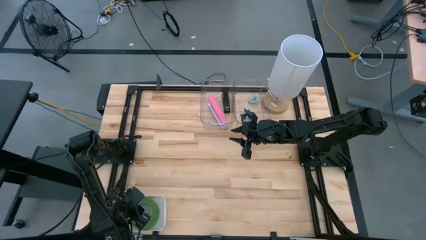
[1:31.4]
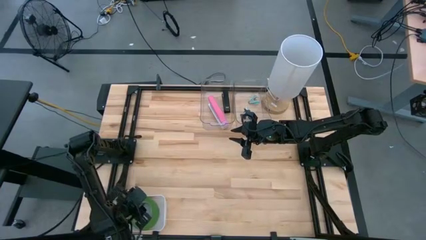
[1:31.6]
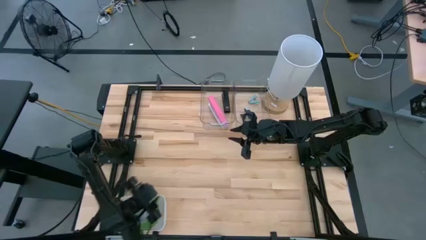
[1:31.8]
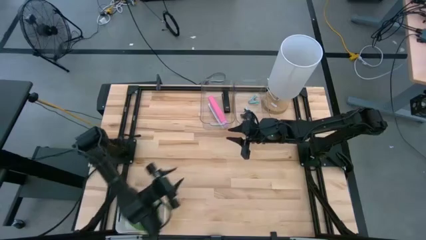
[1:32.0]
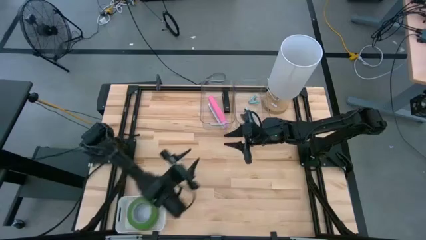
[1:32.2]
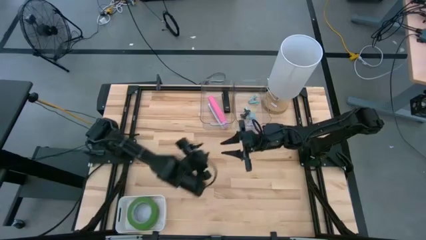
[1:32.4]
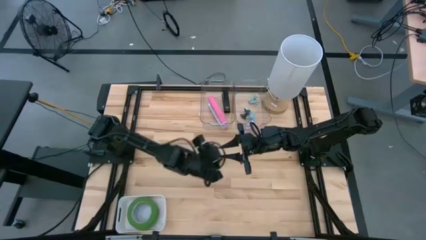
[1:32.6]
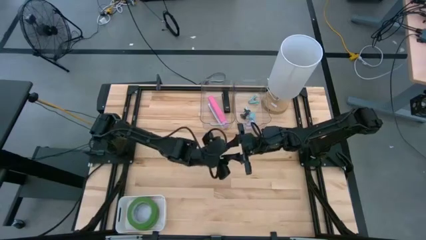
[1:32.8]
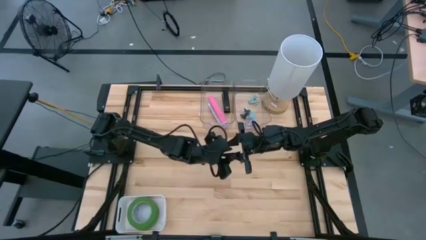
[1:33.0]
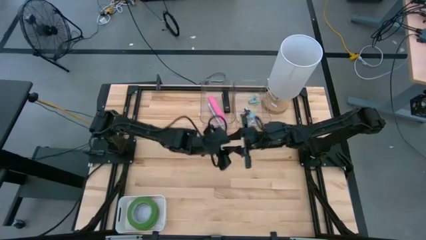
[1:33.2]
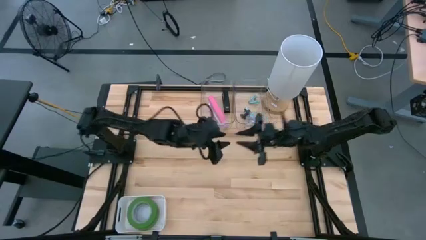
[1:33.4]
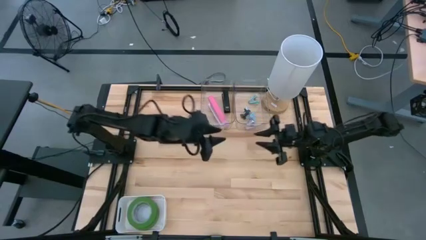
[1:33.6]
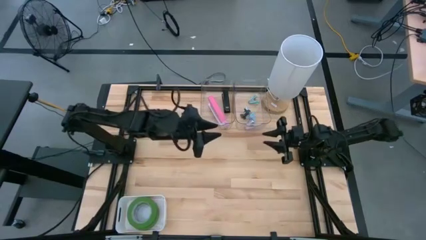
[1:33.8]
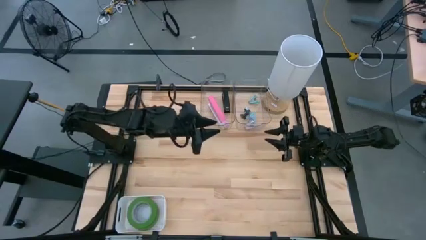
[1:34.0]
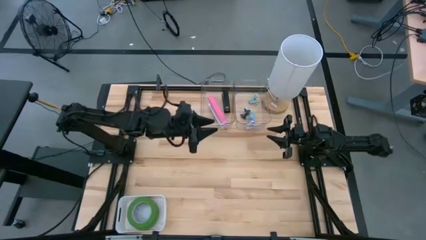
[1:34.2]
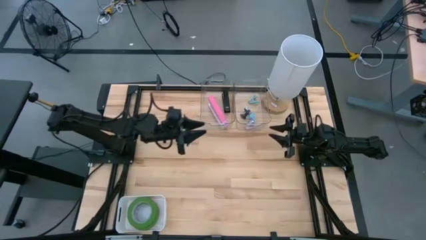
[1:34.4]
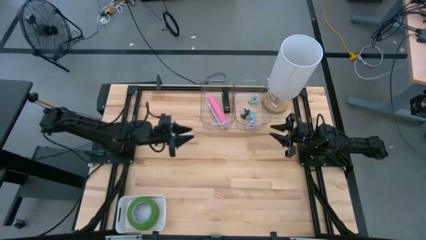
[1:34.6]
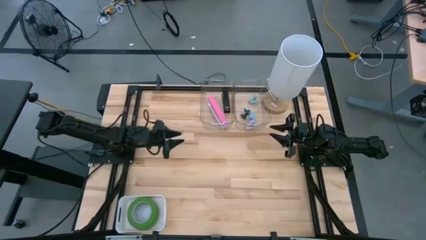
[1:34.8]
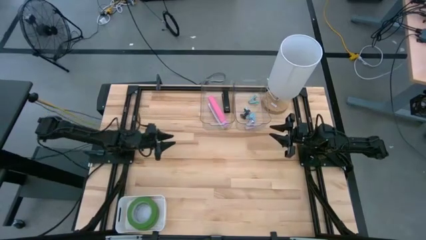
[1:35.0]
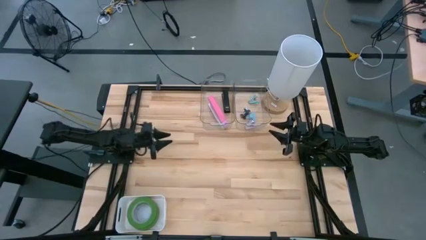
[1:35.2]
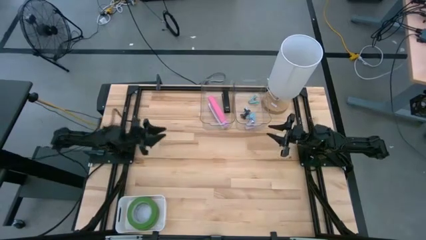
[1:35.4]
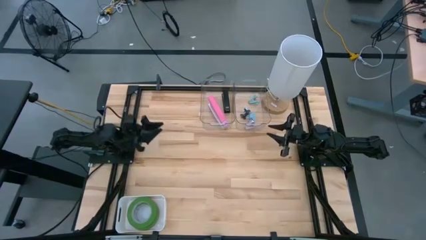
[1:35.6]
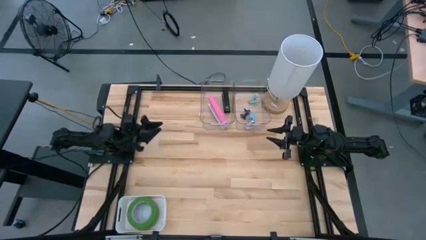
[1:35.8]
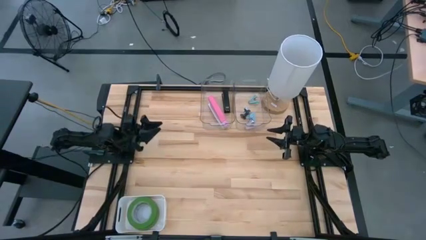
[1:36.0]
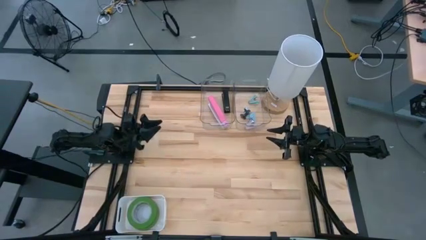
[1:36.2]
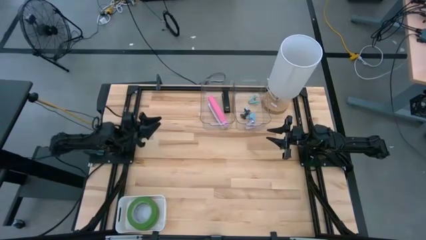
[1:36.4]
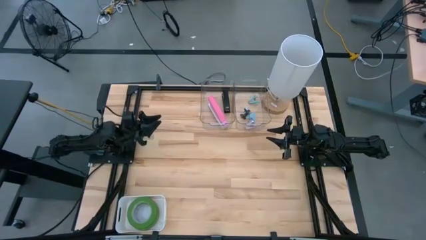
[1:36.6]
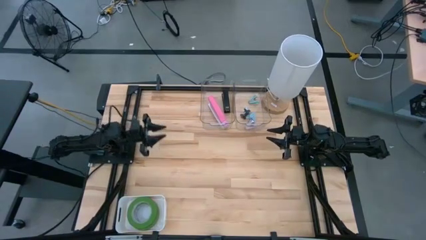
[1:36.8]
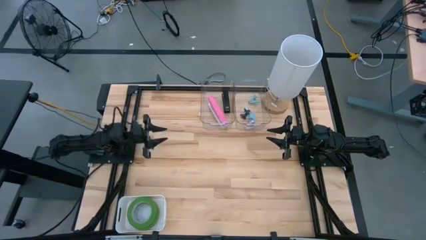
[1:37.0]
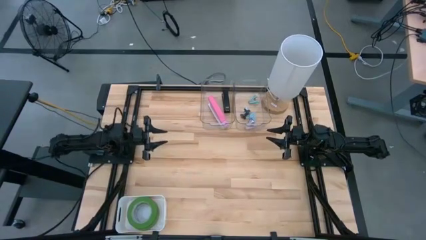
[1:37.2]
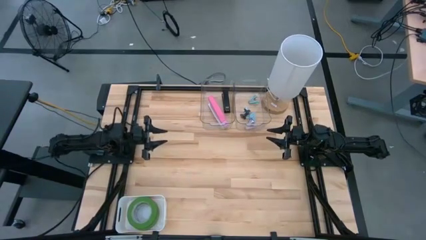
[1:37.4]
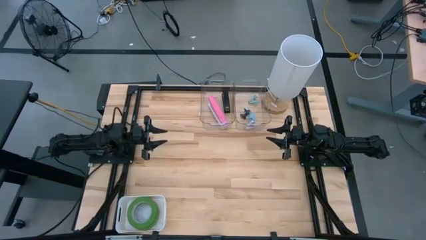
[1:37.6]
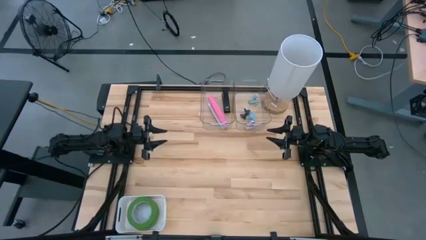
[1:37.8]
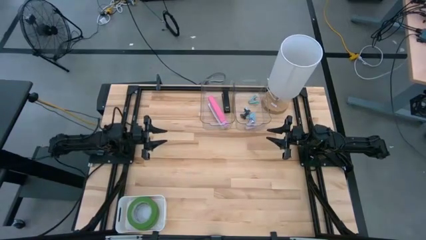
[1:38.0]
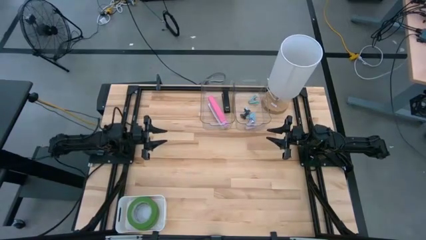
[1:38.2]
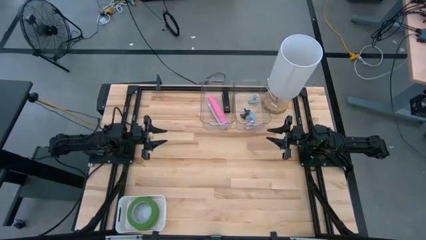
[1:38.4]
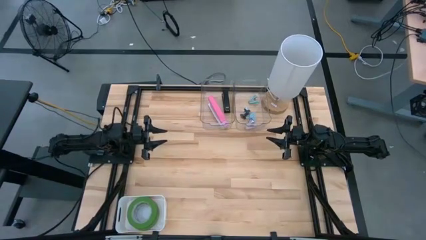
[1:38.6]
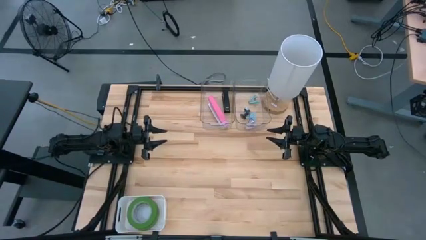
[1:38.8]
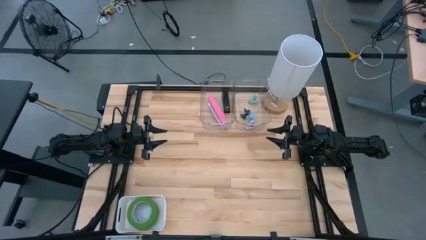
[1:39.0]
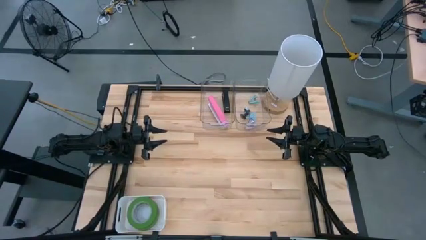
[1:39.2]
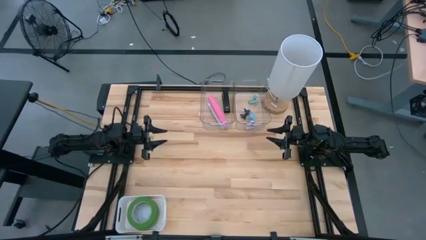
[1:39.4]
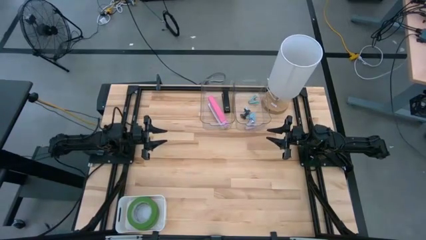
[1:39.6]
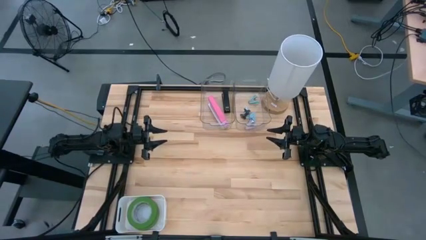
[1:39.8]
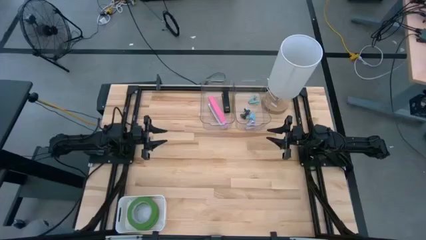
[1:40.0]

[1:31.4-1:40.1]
Task: Pick and place Stapler, Stapler remover, tape
Return to Home Position

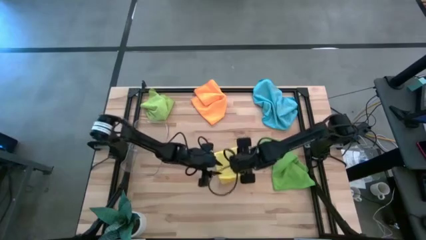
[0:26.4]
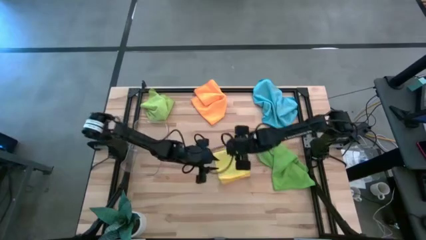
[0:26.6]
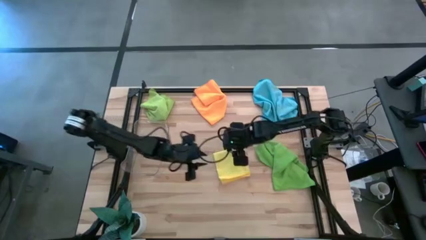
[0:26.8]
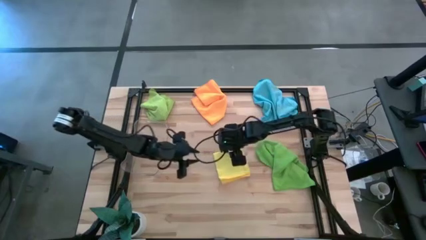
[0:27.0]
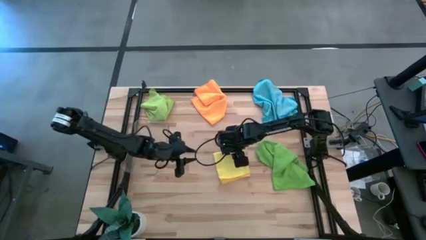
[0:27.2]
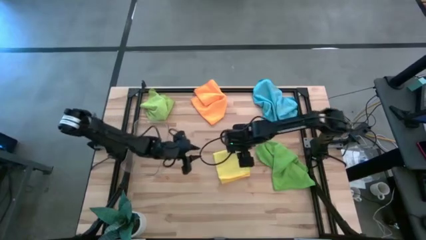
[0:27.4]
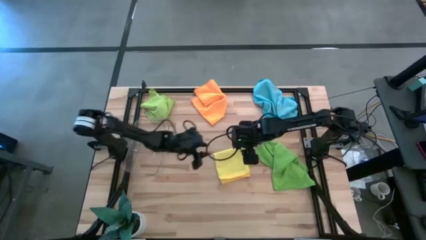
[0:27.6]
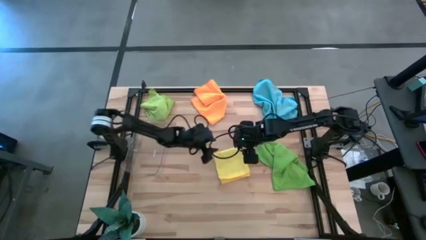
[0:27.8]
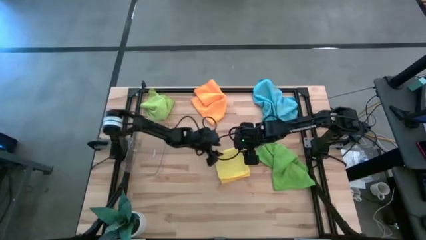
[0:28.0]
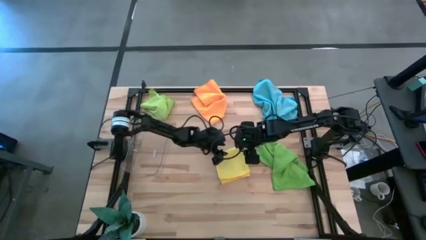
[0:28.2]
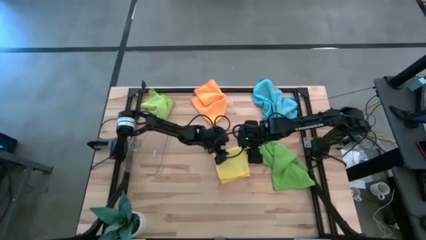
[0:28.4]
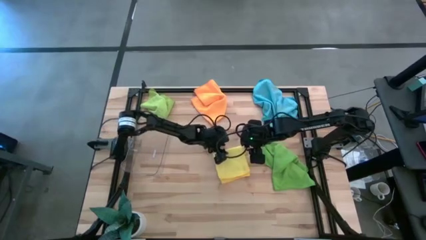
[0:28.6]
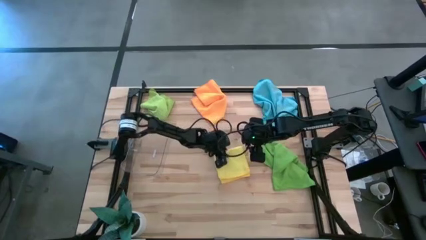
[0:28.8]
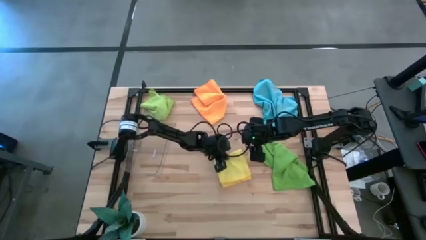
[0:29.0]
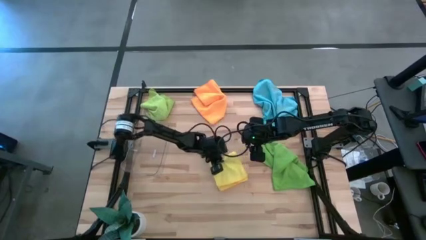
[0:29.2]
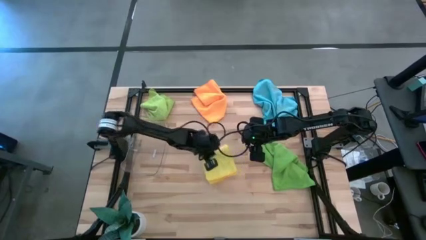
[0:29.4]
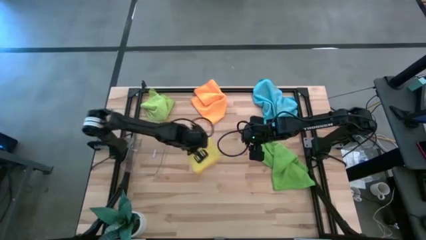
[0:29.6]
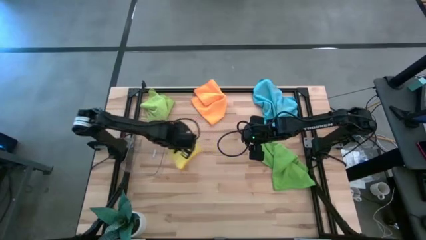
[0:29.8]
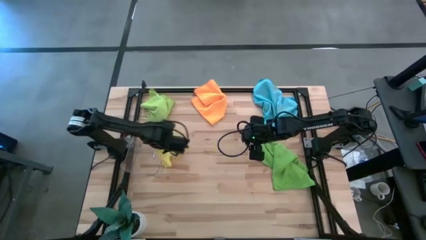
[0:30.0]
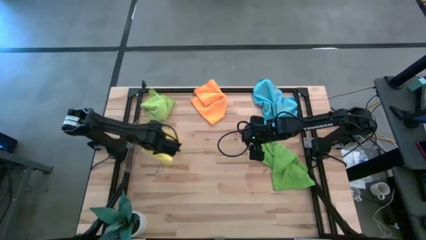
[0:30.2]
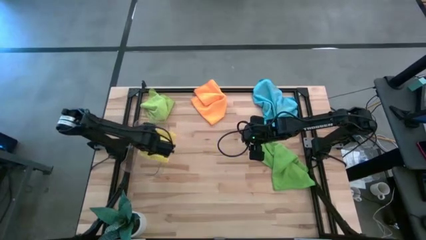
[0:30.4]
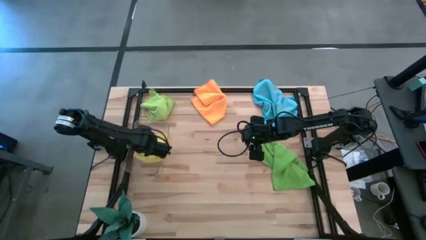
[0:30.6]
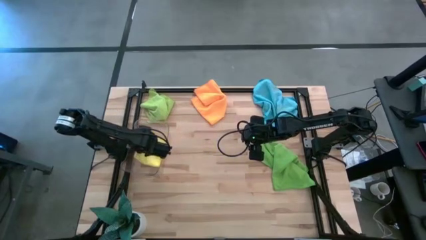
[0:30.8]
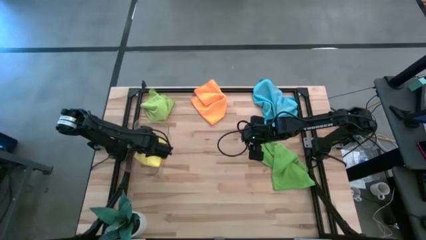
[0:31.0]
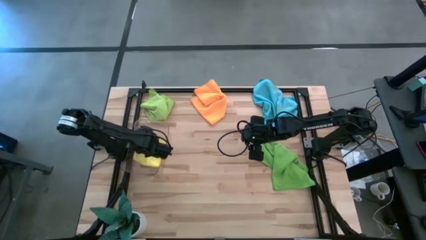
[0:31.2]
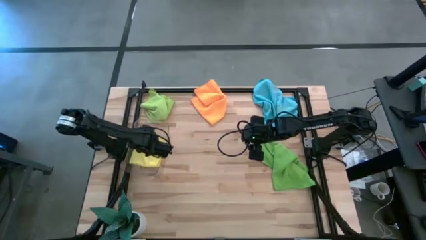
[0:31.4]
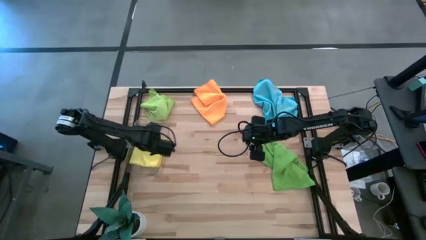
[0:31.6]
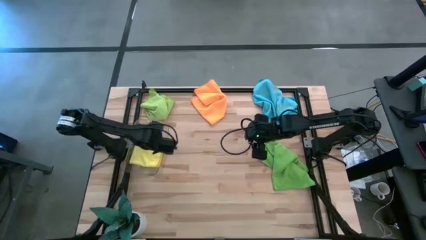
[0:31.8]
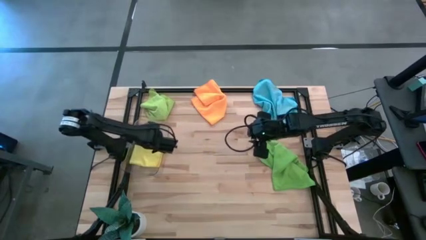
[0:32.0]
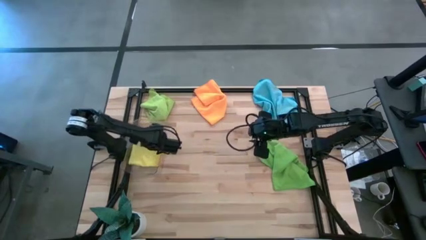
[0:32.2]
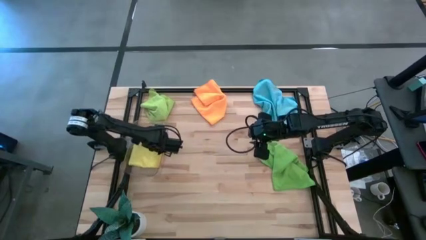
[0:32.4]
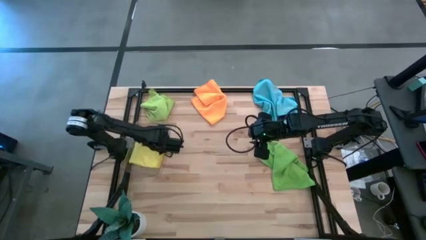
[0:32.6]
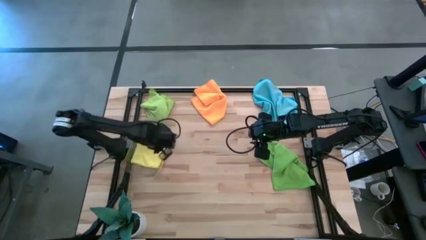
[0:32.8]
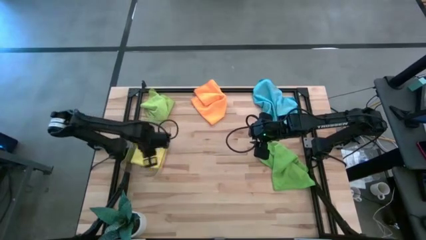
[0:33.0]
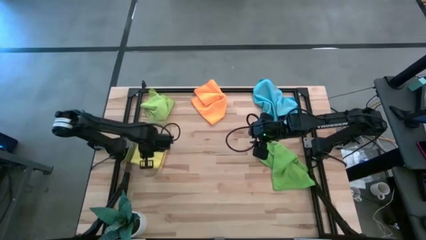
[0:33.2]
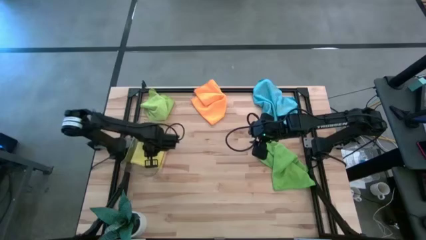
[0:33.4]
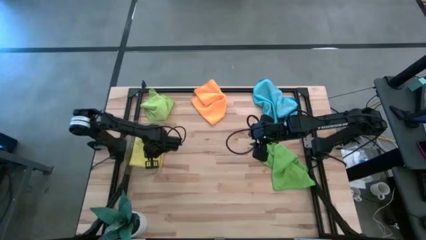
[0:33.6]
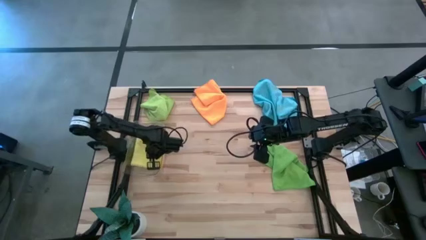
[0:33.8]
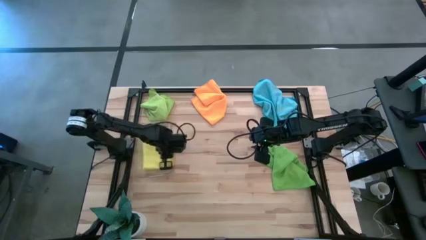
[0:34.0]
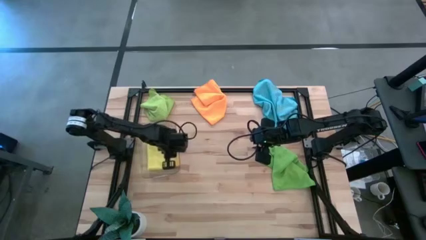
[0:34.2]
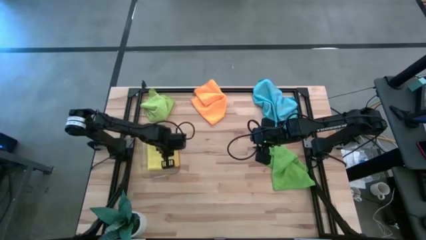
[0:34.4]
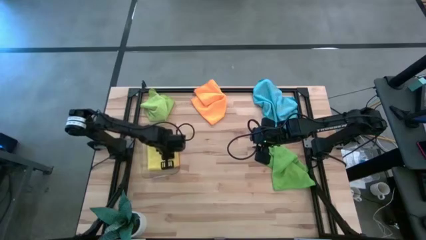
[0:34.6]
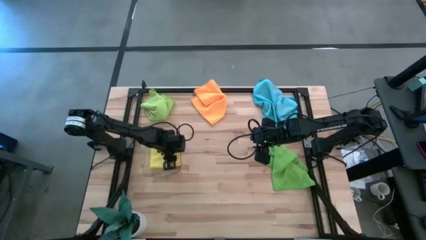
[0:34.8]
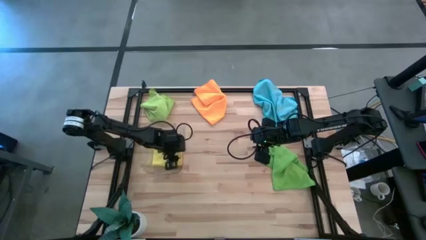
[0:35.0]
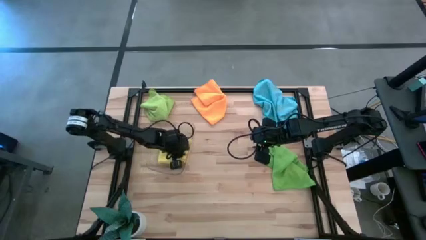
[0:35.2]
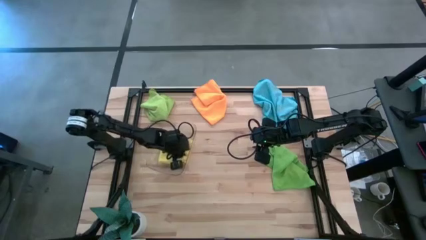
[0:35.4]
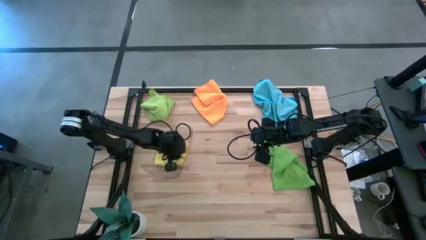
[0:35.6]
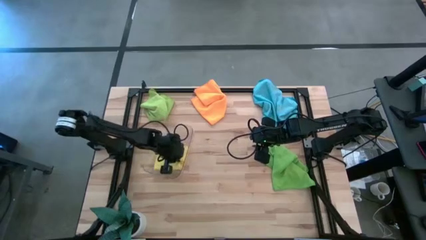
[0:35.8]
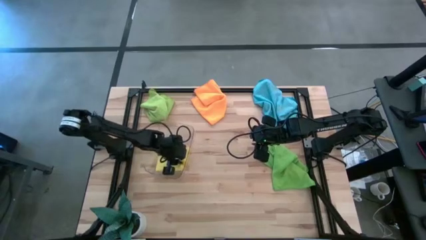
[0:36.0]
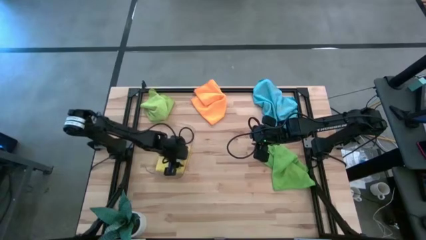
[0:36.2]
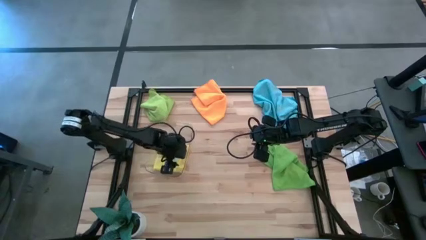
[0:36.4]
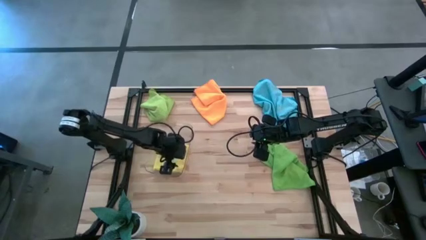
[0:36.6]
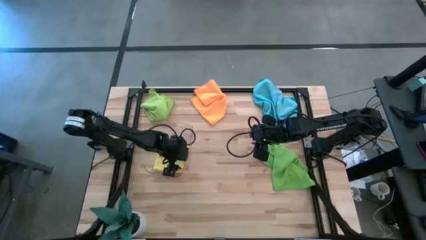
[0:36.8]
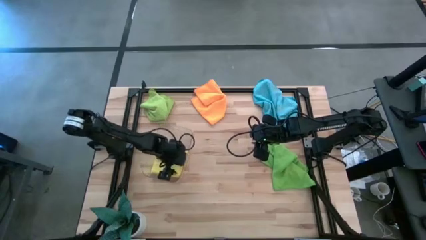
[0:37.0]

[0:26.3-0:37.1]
Task: Fold microfiber towels
Put the folded yellow microfiber towel into the transparent bin
